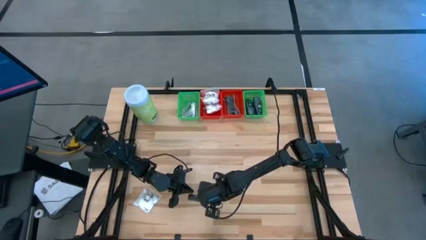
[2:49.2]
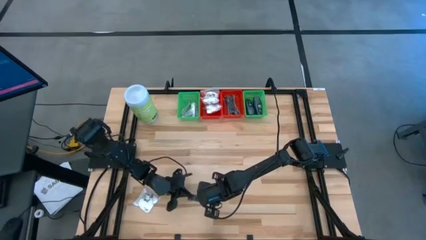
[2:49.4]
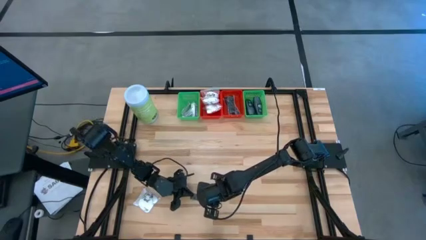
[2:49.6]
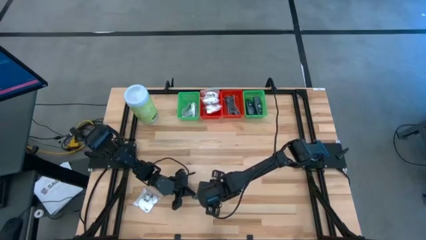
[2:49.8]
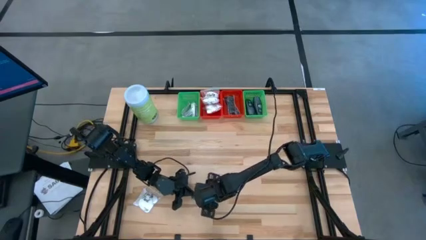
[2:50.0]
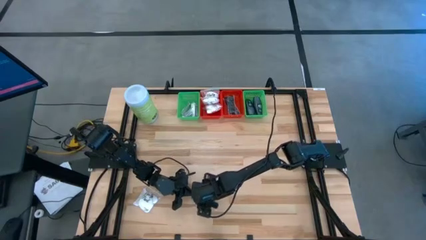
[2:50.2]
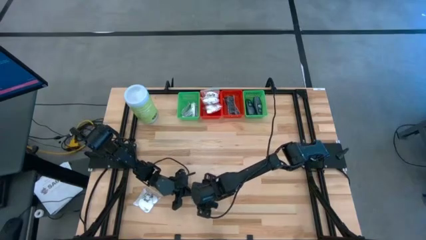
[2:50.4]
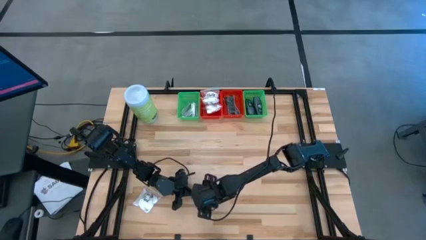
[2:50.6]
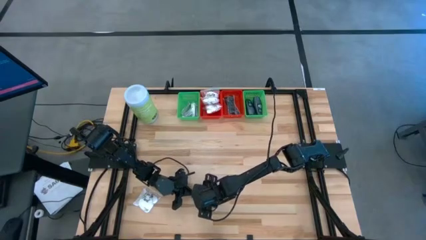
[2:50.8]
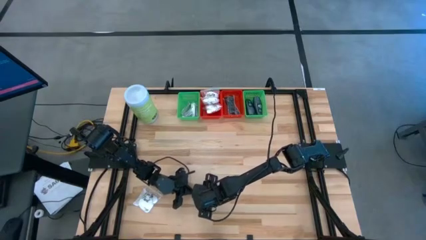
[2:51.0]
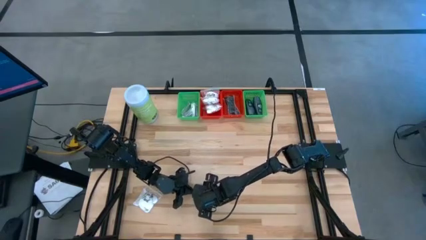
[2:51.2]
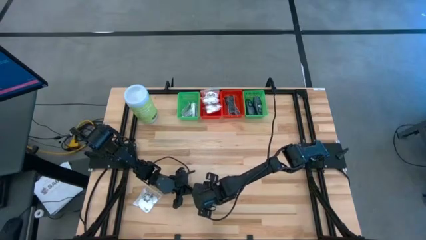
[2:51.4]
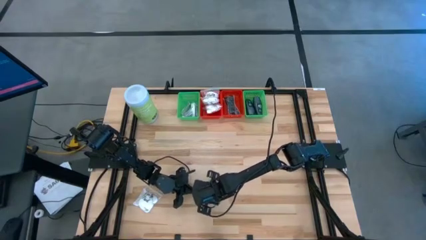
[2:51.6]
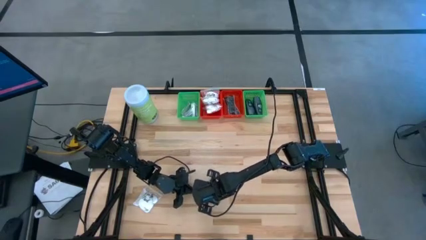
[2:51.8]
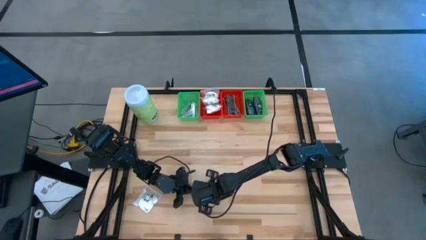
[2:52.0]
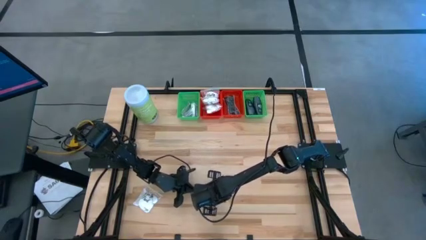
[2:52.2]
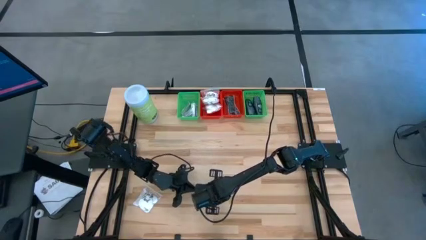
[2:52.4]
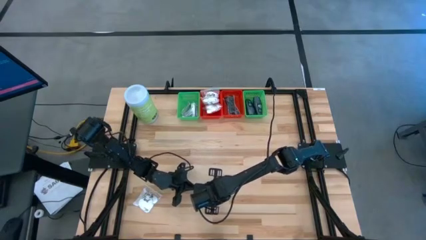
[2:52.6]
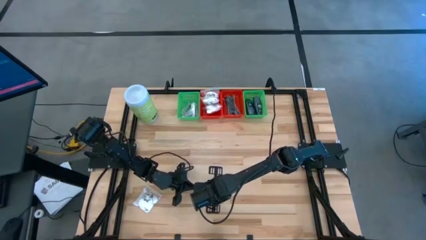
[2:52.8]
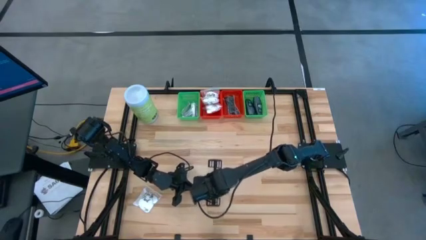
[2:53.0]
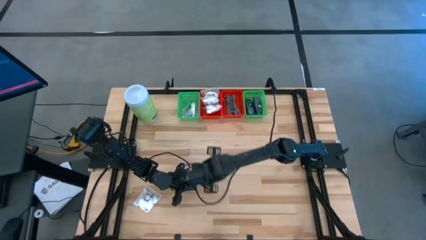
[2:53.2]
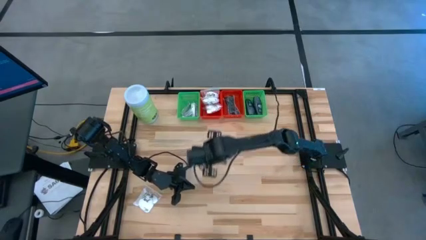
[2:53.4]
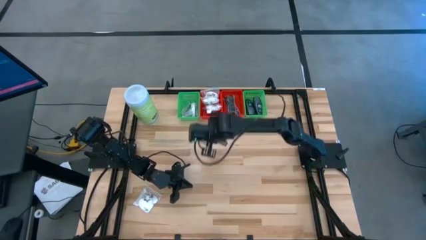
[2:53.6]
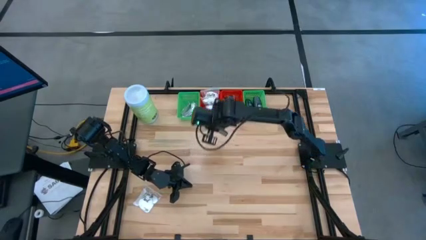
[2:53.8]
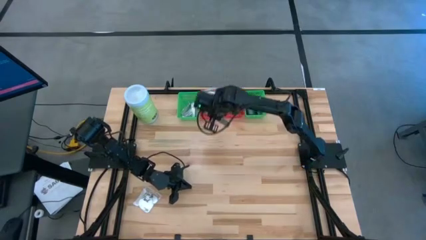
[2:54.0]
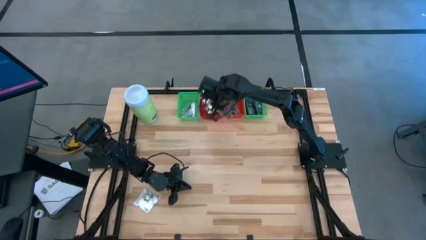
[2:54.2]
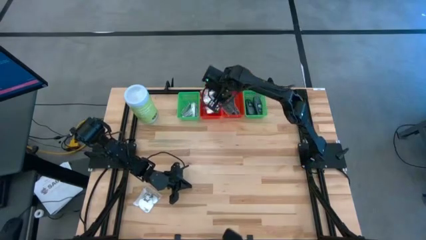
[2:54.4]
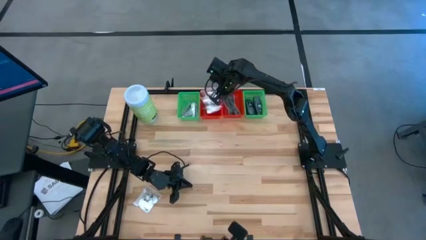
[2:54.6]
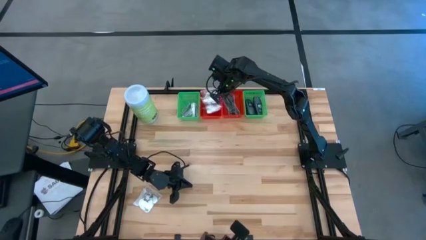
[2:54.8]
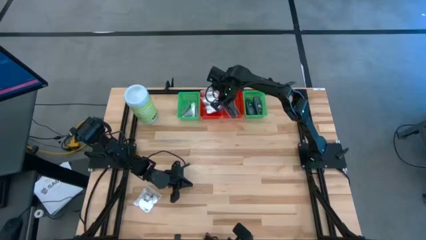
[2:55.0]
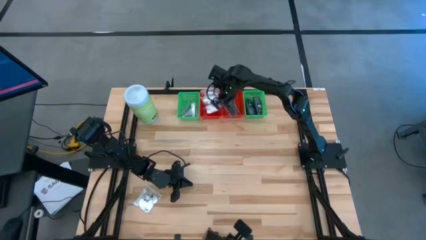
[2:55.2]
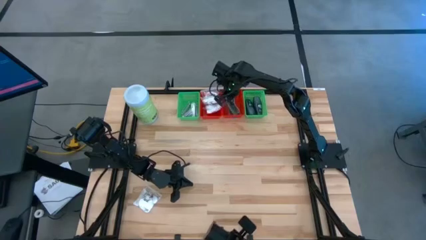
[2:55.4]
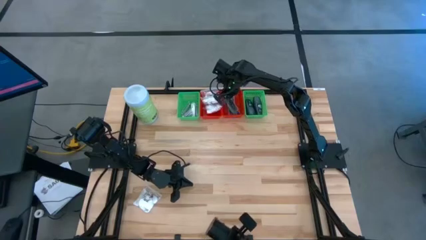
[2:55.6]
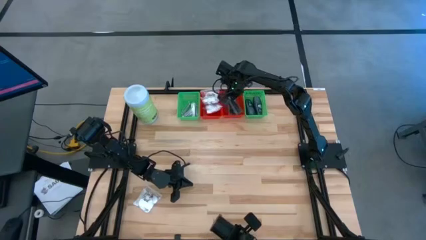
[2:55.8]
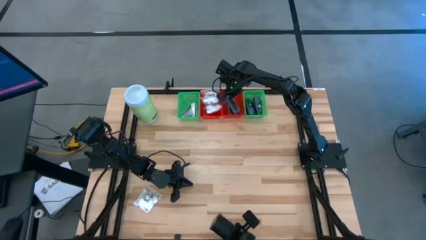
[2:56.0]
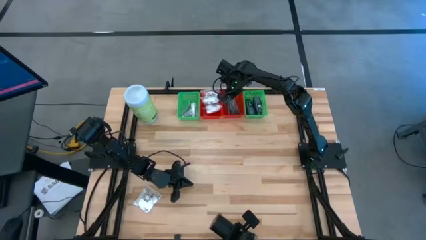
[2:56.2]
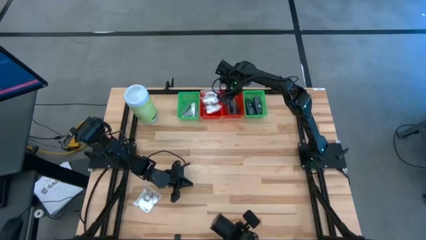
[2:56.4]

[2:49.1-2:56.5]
Task: Pick & Place Travel size toiletries
Put the black comb into the right red bin

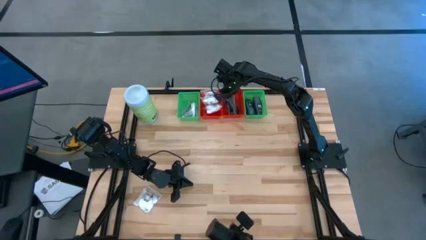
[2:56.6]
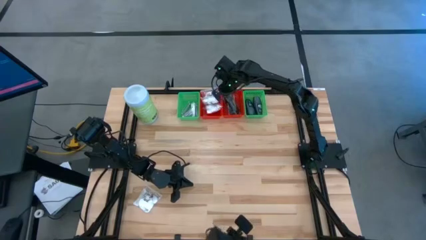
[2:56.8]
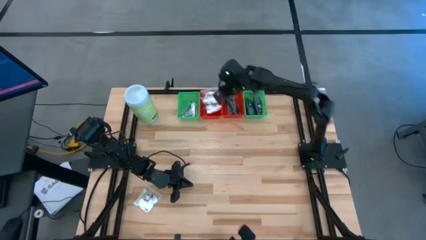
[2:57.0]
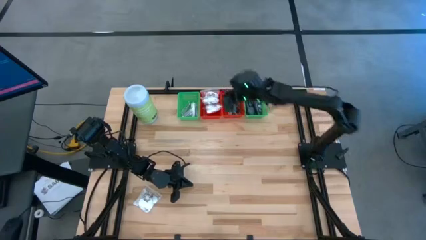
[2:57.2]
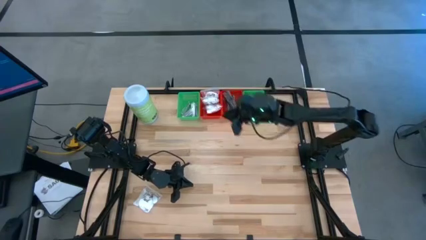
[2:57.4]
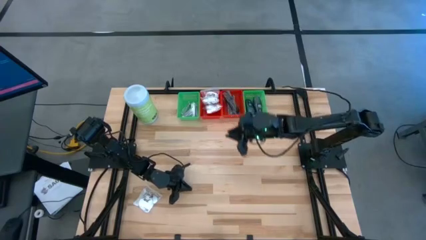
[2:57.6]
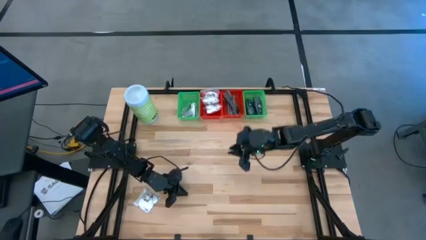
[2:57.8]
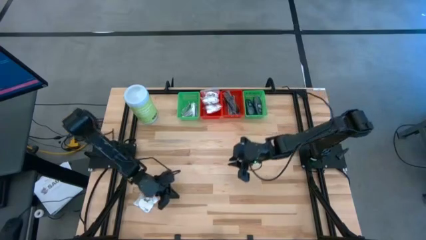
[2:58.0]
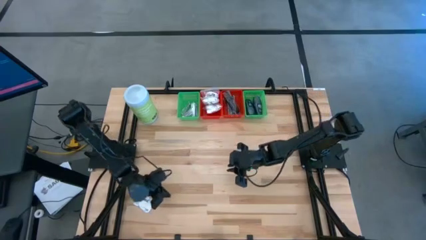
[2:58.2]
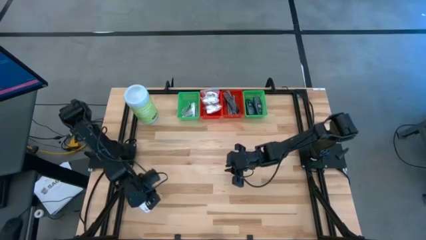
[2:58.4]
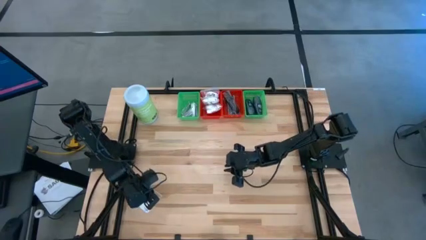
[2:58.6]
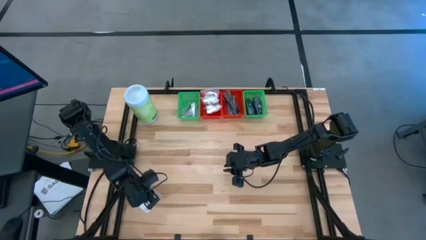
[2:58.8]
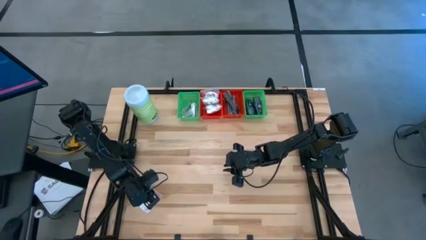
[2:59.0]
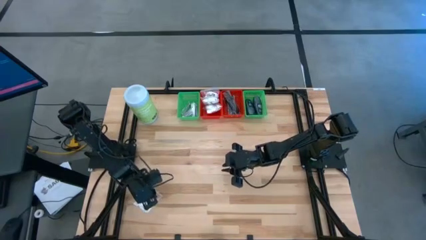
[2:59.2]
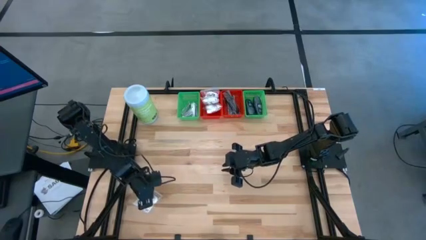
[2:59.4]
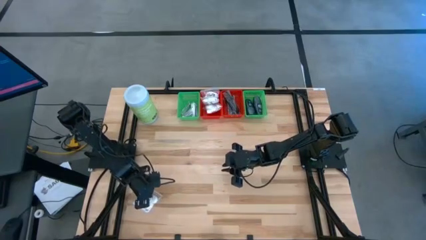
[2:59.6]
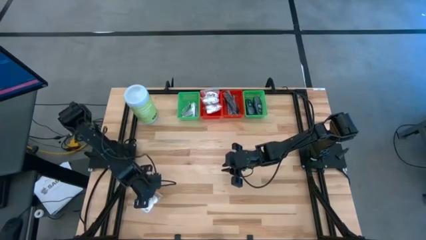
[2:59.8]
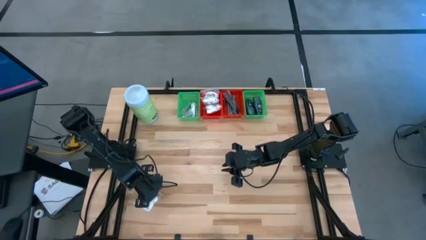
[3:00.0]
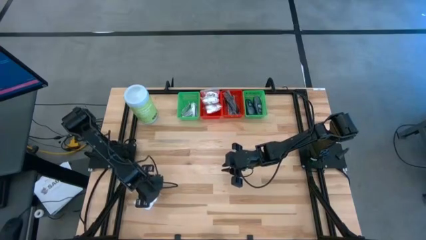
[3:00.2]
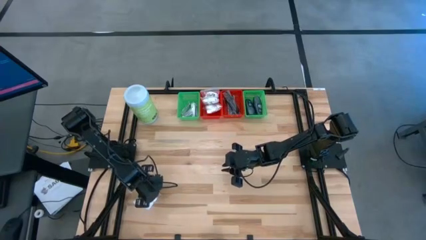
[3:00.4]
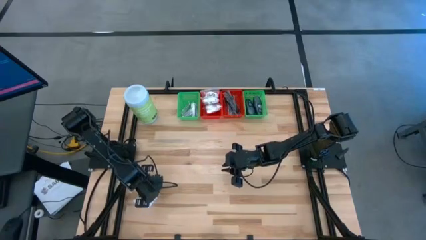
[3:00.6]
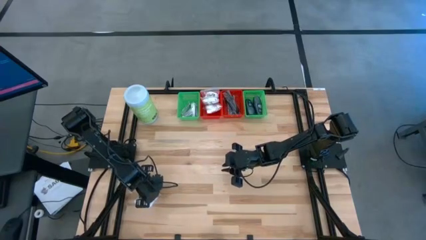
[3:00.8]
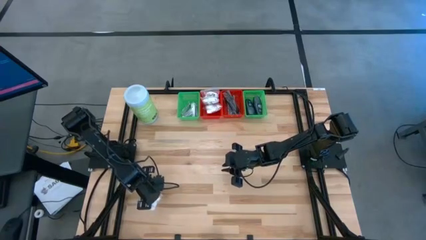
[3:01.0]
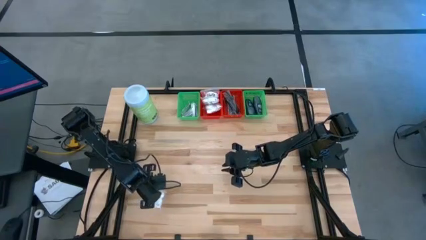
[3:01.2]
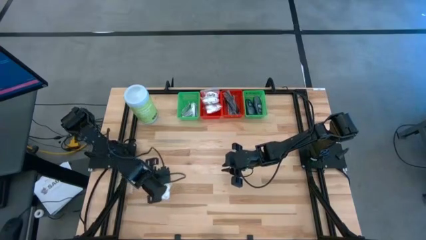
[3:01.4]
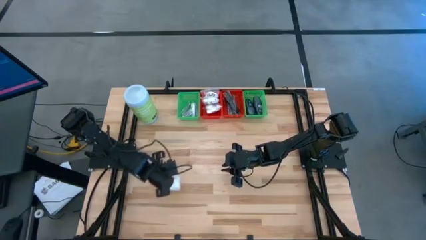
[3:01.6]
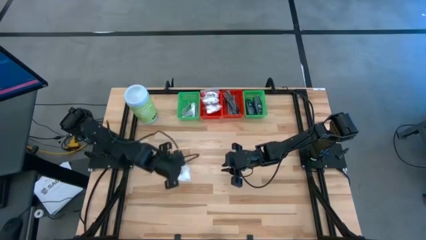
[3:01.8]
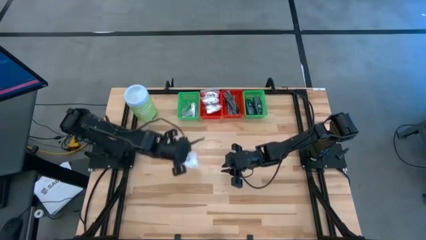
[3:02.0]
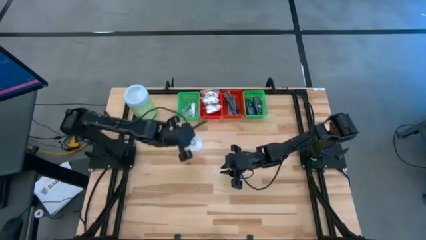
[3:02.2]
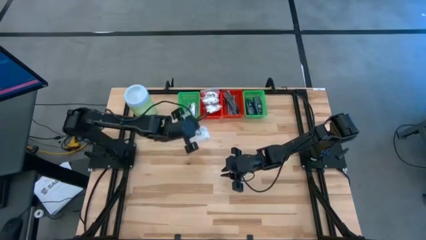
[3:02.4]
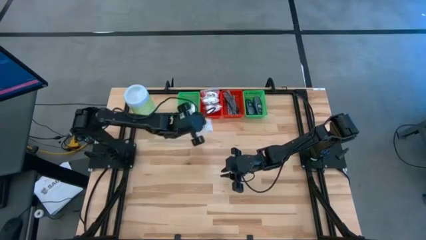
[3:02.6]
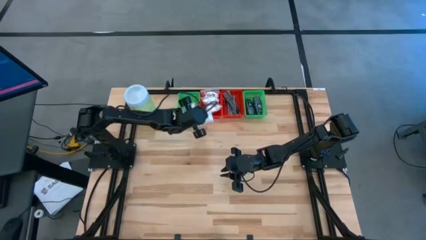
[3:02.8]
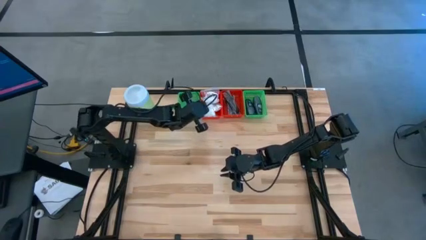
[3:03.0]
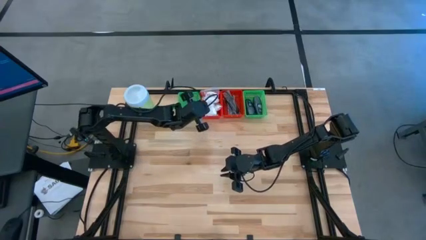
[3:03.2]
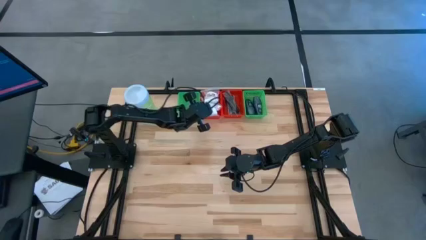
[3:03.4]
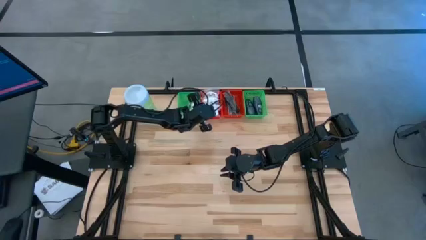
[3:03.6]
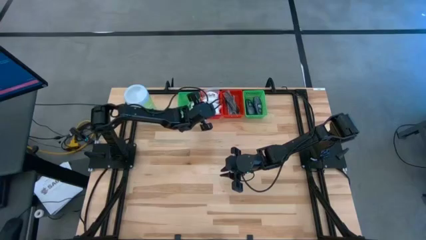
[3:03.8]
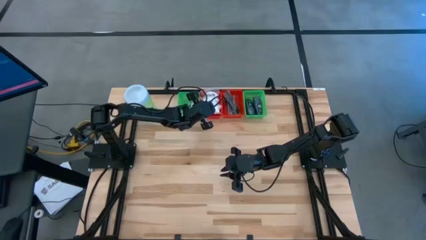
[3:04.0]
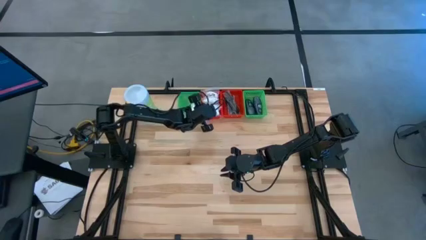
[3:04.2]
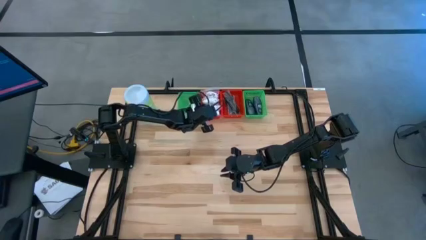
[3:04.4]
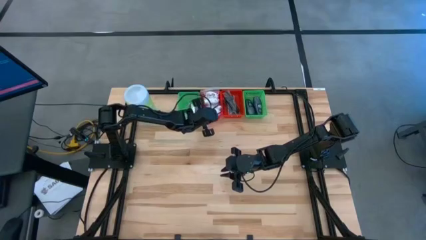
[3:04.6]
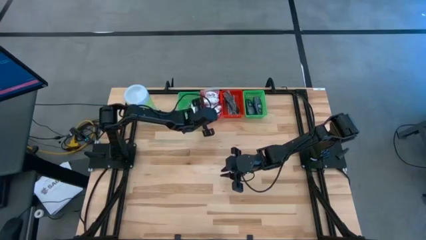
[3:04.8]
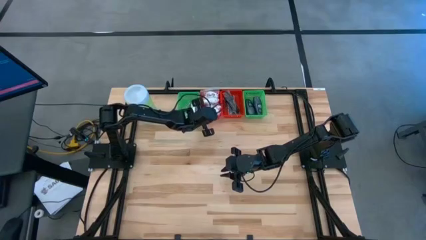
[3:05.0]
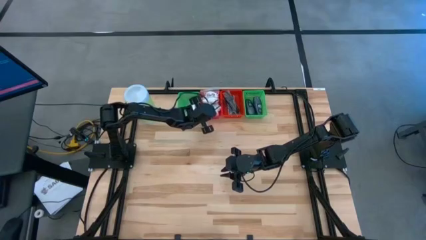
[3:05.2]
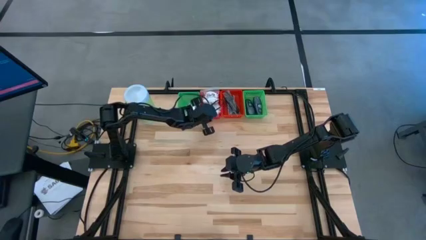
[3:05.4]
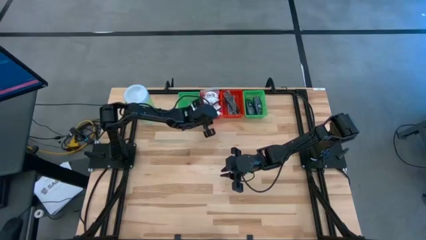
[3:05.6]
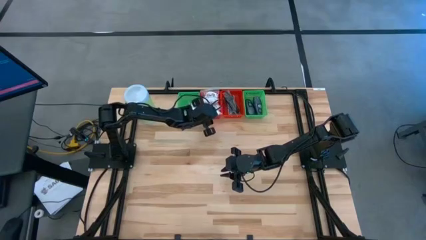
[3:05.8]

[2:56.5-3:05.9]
Put the white cotton pack into the left red bin
